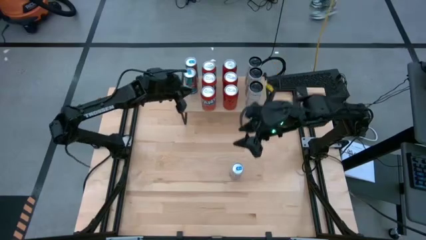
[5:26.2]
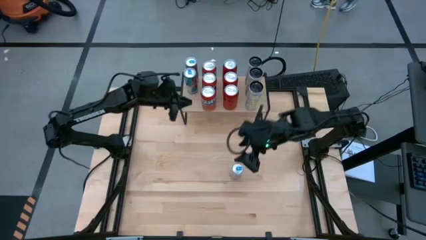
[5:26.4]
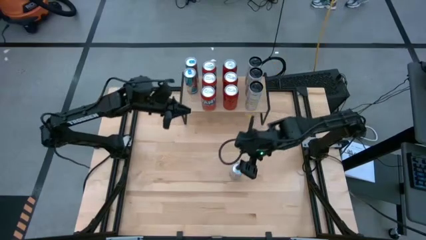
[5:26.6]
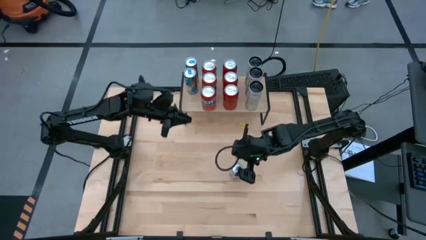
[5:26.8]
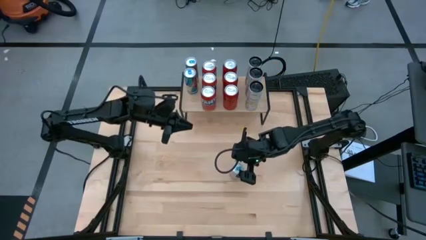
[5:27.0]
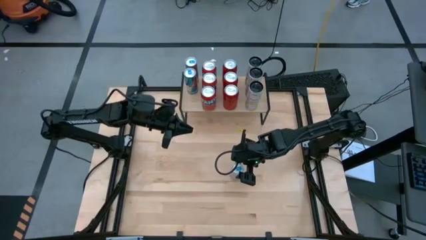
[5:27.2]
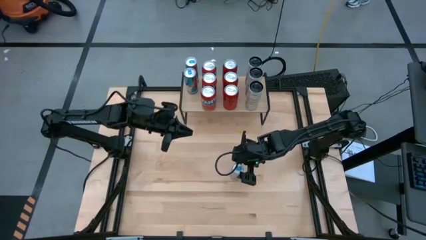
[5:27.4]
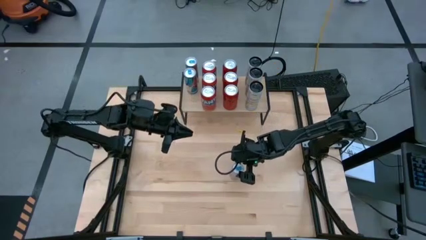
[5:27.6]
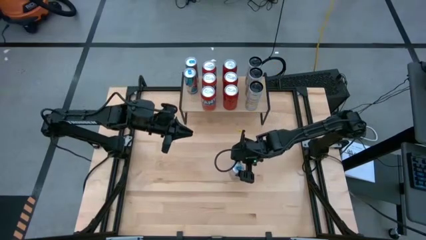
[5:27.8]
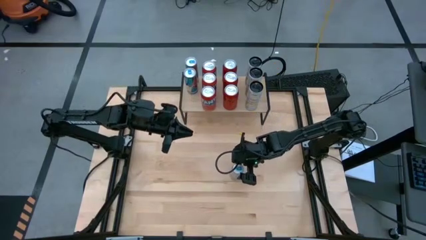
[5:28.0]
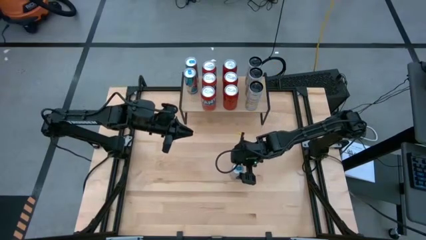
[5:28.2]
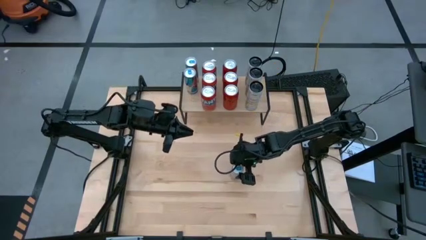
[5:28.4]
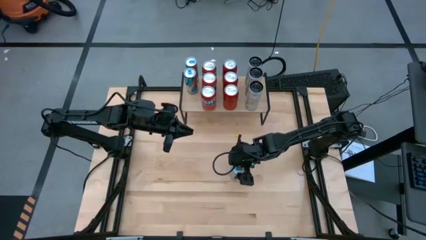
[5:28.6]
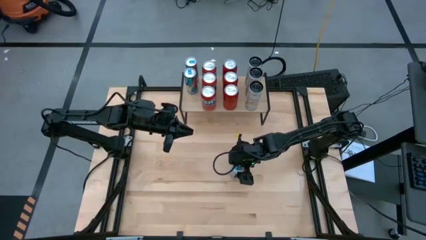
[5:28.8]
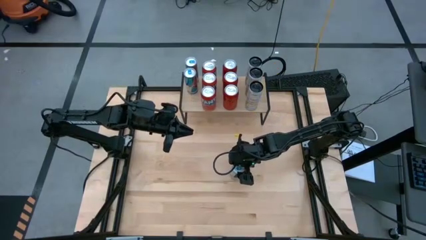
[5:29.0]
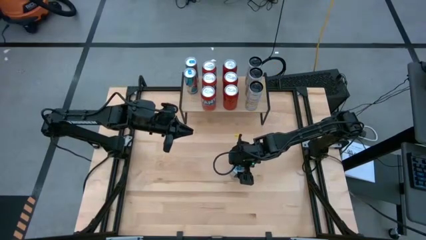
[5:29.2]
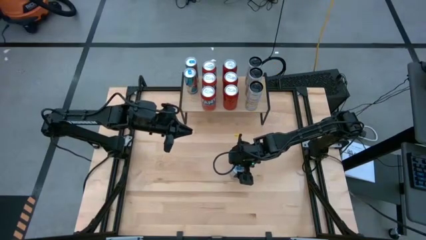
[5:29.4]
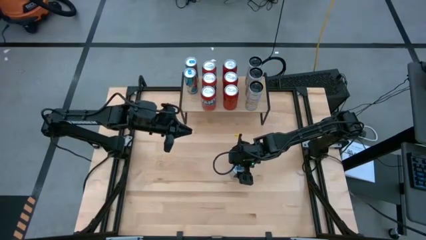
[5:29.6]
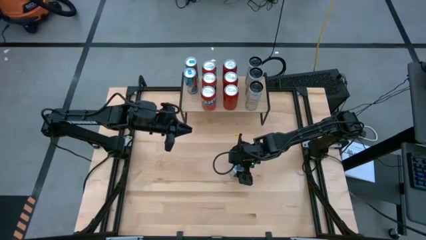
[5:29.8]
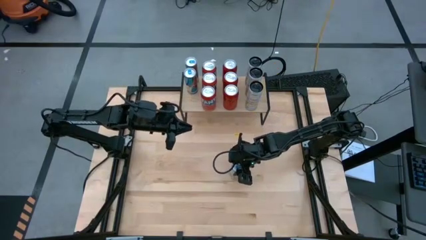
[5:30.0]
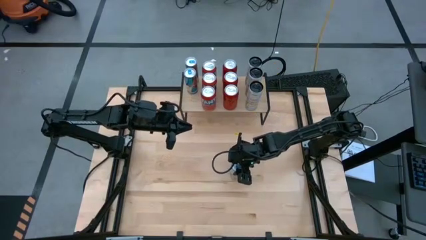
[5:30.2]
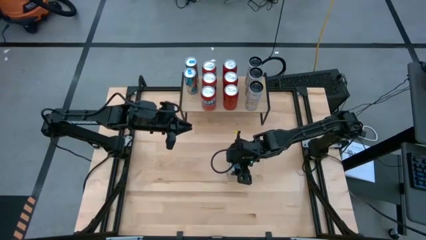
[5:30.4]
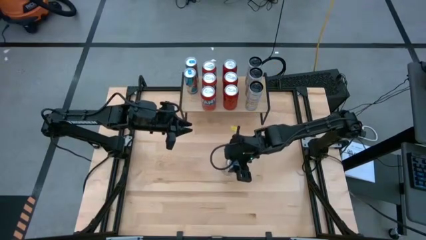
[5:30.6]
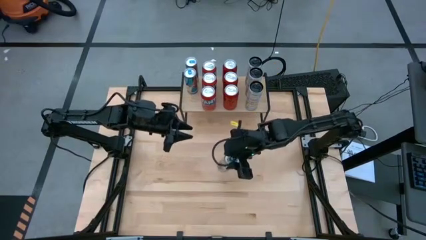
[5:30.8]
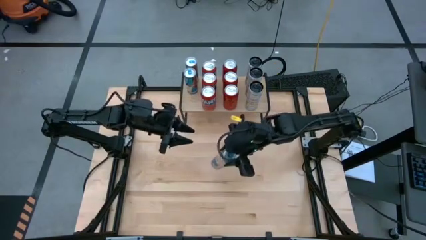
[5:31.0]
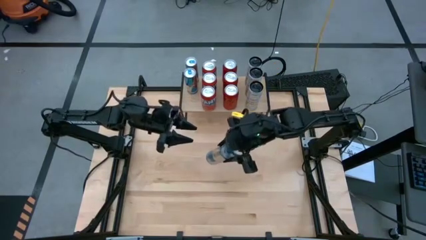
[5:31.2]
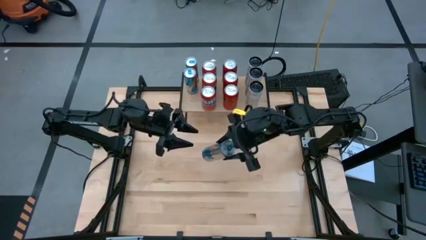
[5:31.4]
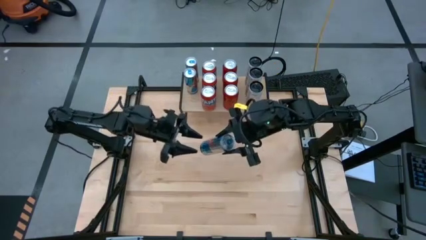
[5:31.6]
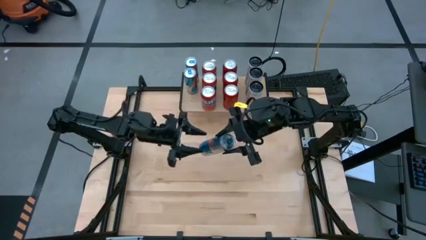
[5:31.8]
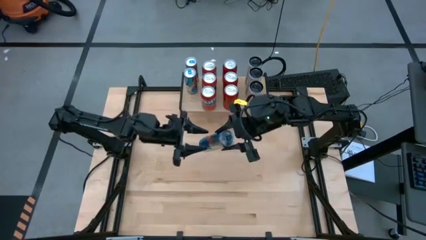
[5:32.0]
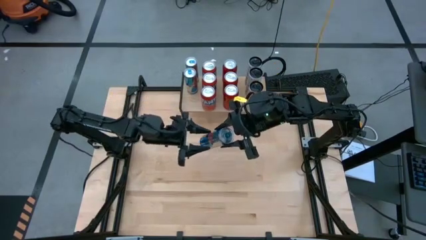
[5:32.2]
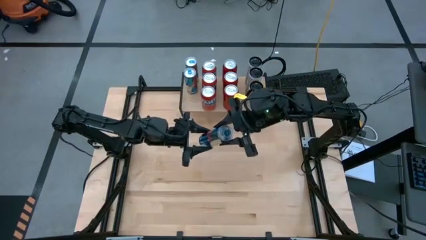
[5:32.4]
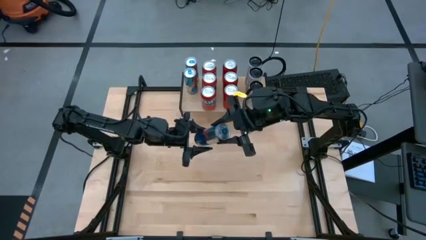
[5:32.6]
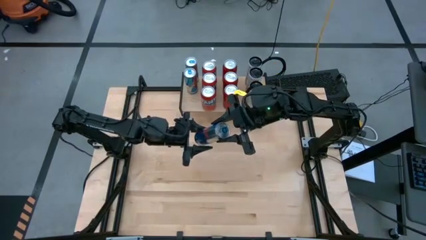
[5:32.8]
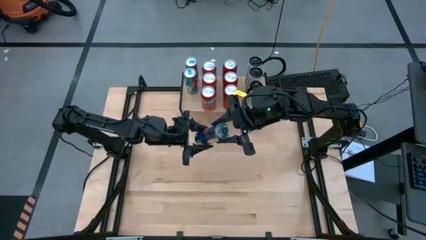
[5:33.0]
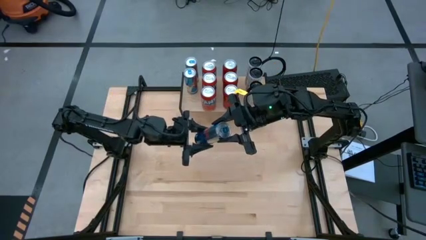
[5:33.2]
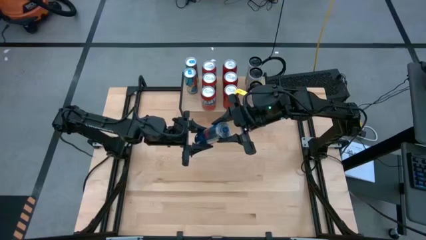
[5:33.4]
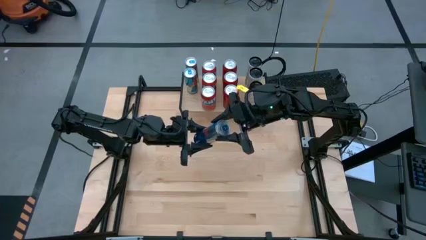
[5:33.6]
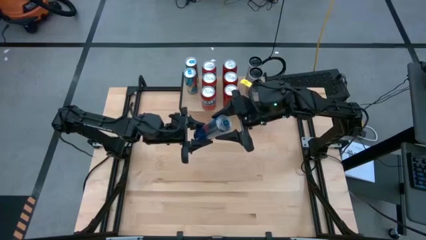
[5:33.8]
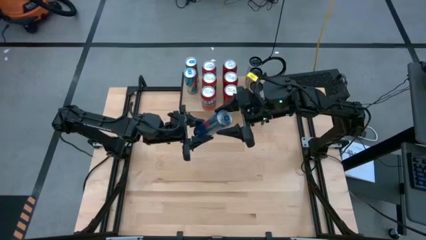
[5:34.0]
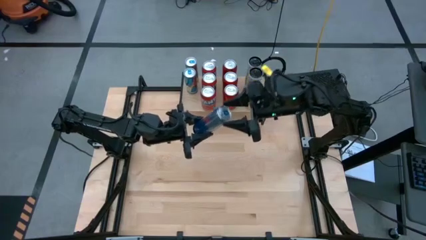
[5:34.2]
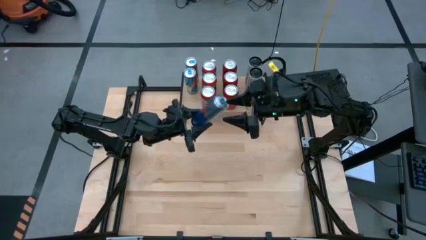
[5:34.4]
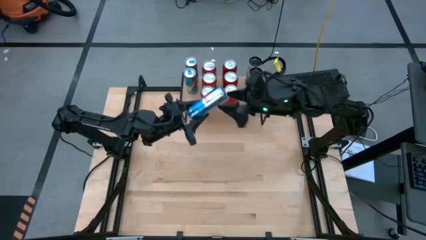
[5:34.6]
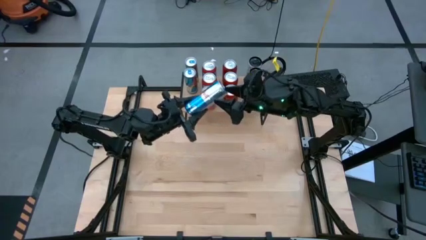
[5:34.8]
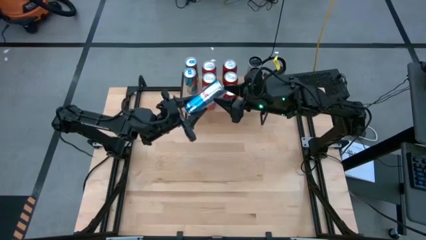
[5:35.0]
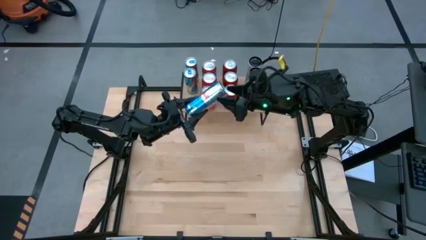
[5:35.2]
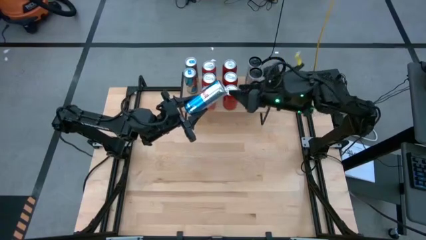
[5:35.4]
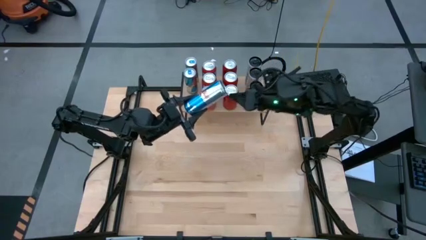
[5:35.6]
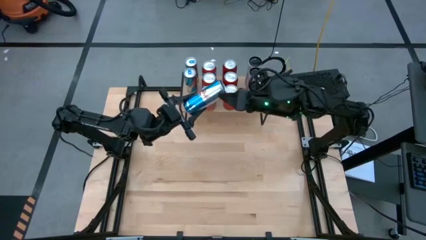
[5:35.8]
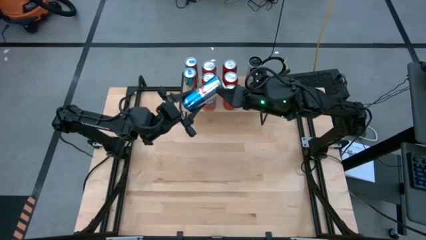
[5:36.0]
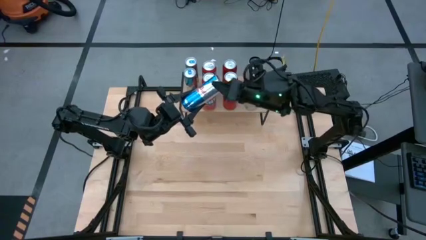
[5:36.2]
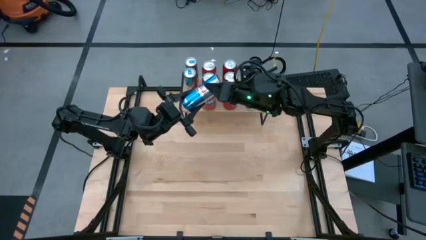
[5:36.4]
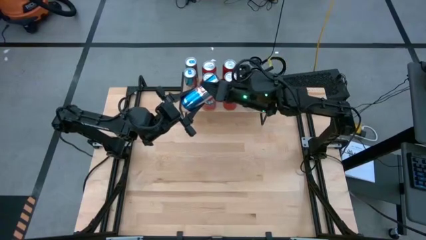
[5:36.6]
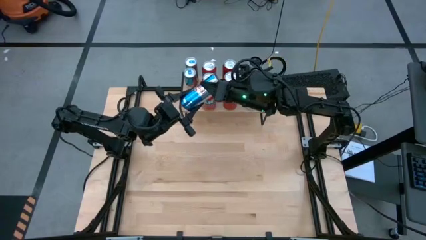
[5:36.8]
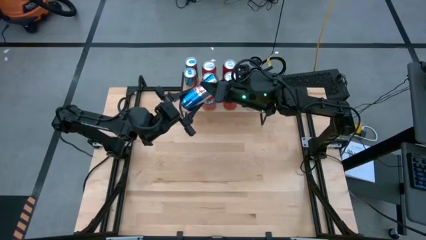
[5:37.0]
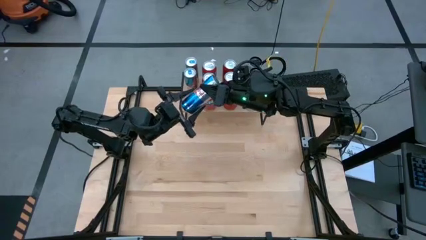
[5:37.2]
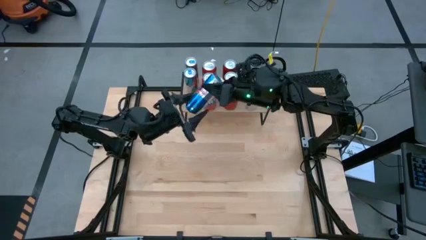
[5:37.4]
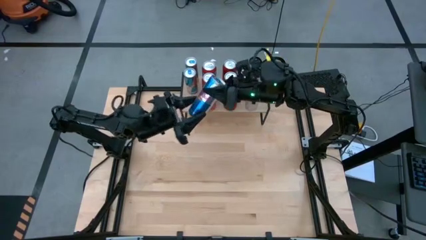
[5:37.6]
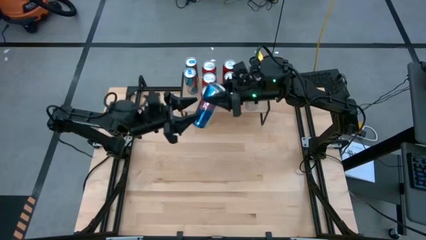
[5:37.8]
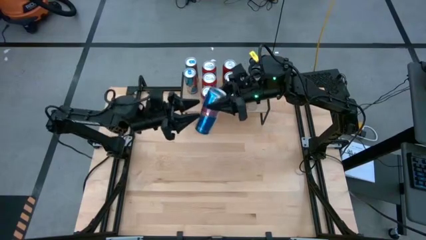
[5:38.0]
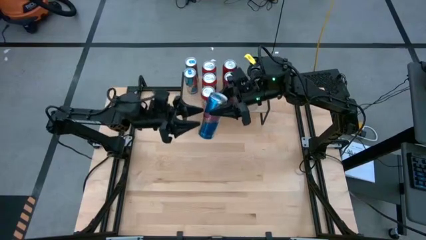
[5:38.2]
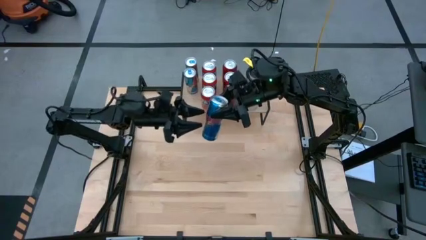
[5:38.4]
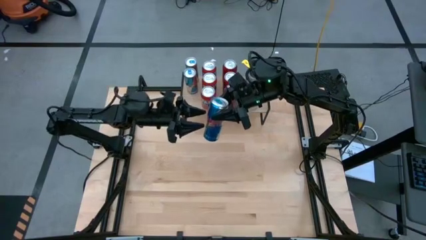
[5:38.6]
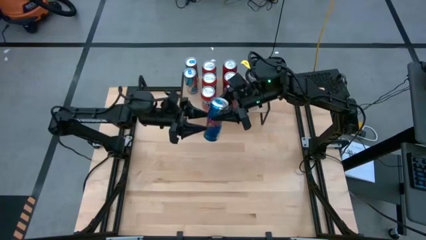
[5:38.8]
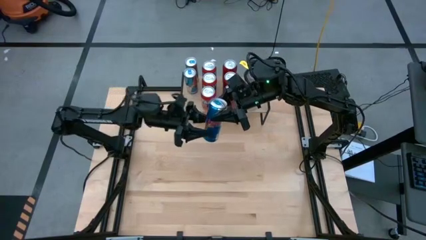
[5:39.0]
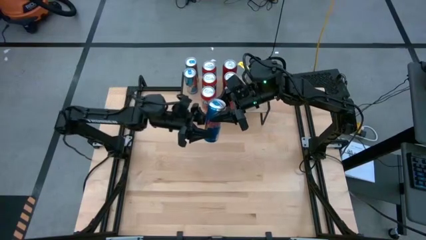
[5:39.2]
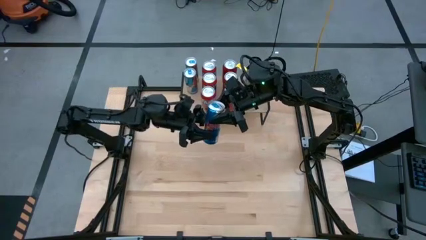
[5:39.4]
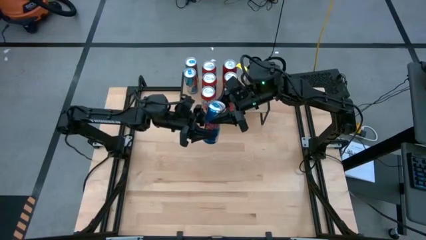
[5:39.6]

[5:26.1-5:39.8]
Task: Place canned beverage on shelf
Put the blue soda can on the shelf aligned with the other blue soda can

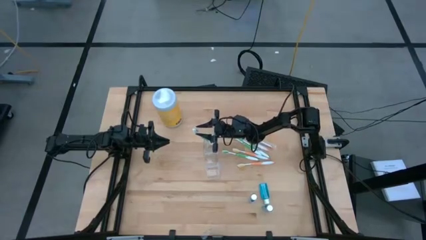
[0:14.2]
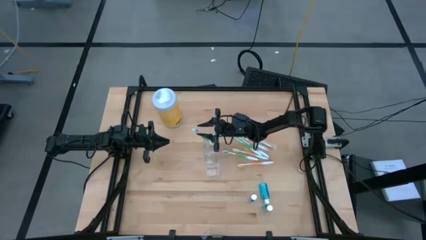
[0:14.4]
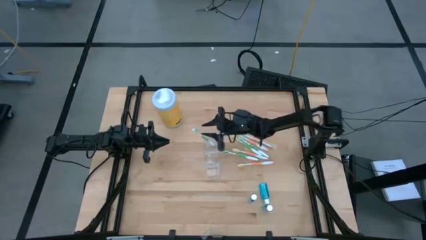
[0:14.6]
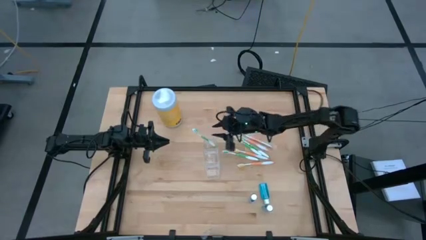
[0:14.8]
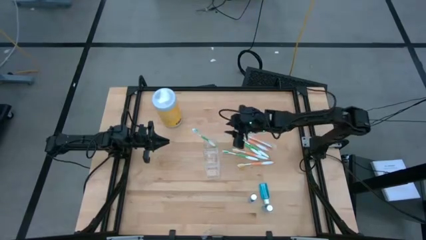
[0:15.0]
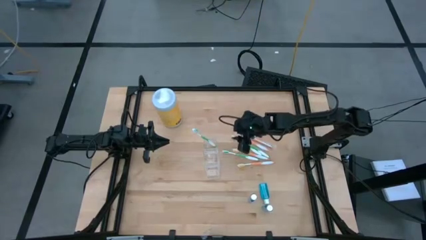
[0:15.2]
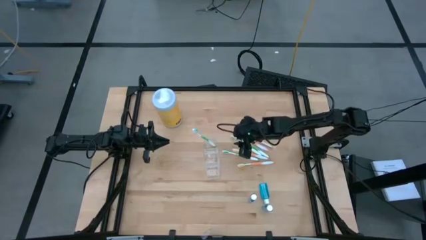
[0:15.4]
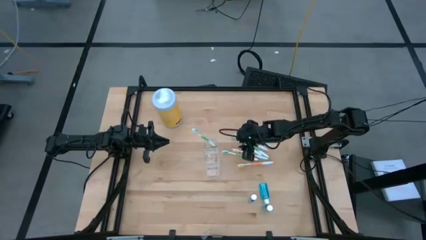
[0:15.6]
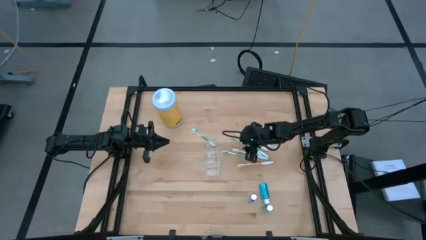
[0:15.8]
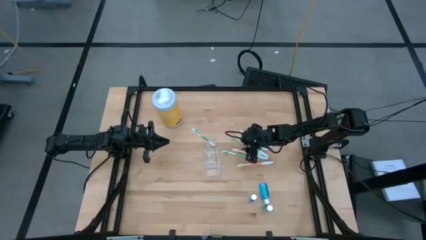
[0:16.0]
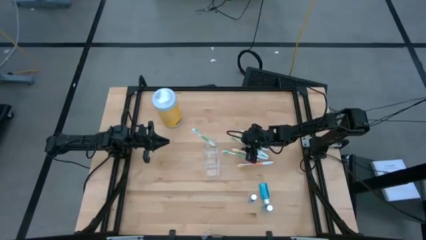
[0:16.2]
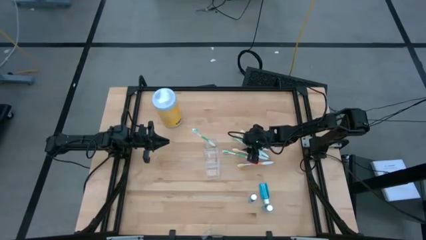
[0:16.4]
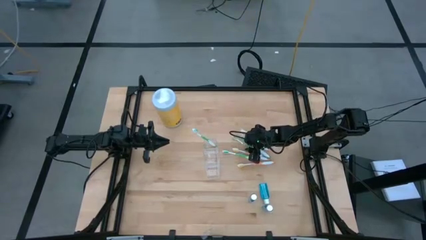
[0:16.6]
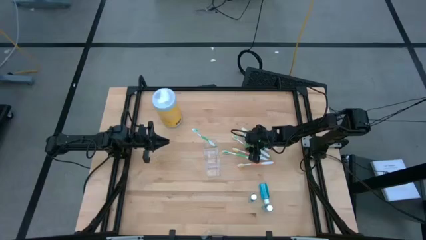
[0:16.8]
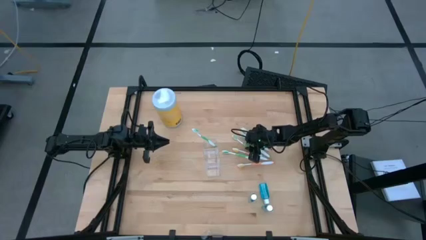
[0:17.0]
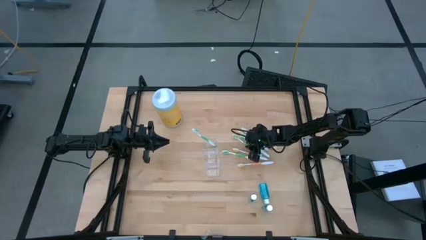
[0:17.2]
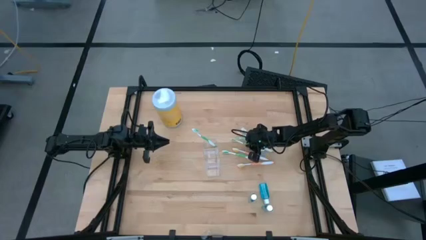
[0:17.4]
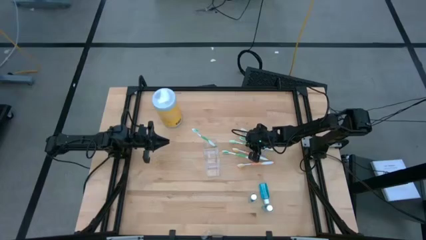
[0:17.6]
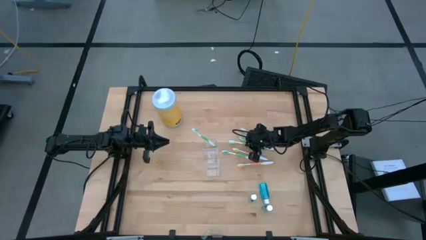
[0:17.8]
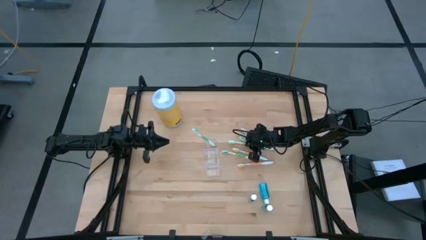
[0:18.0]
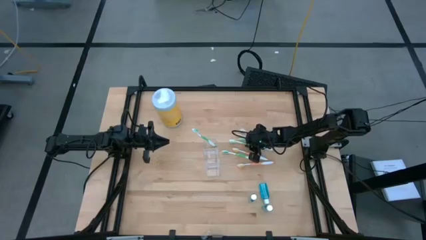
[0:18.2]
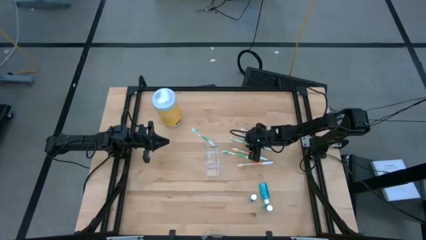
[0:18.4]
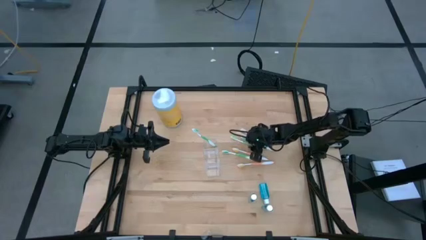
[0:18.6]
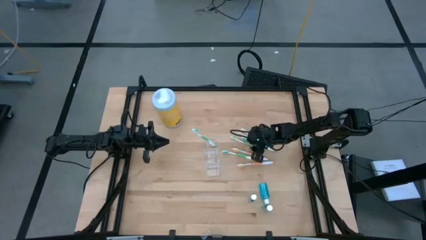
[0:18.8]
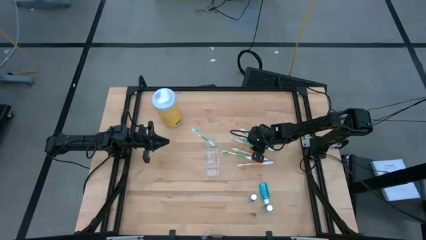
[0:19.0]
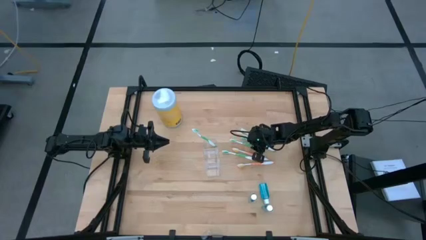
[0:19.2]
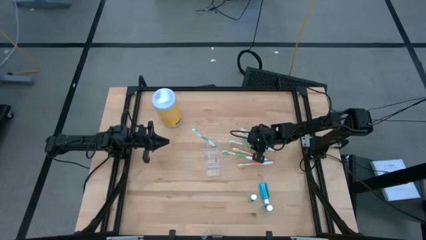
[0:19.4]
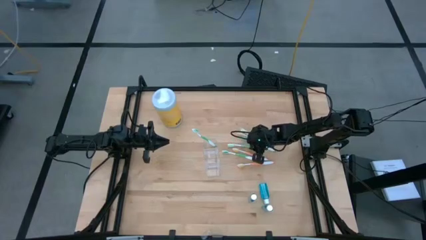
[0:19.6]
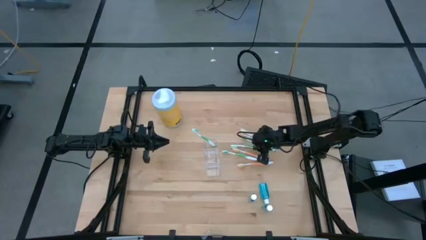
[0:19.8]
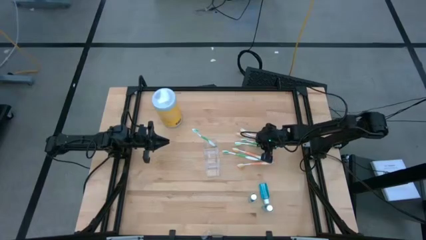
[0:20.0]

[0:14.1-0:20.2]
Task: Pick & Place toothbrushing station
Put the green toothbrush into the transparent organizer
